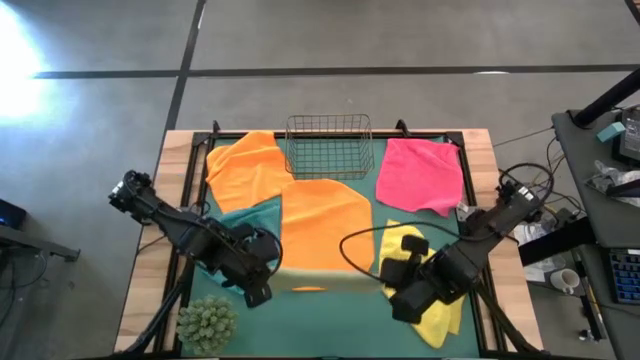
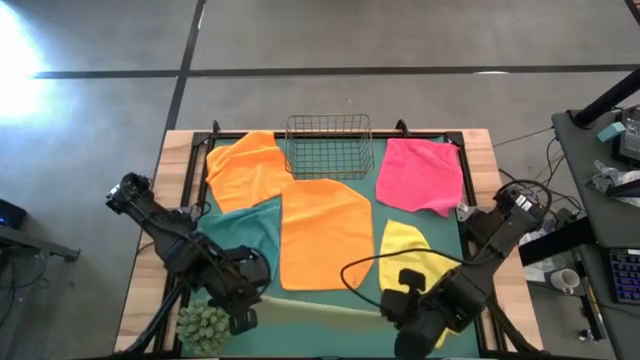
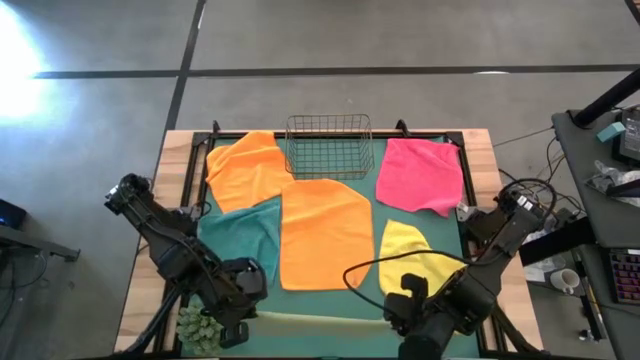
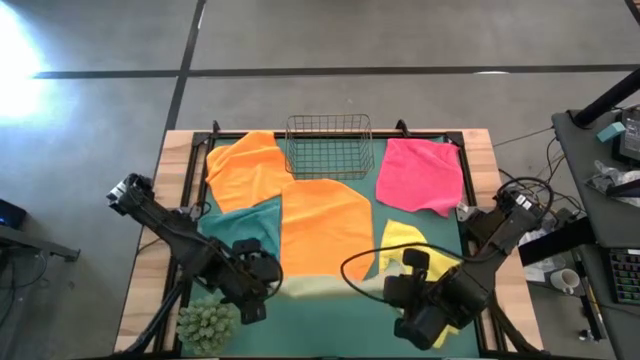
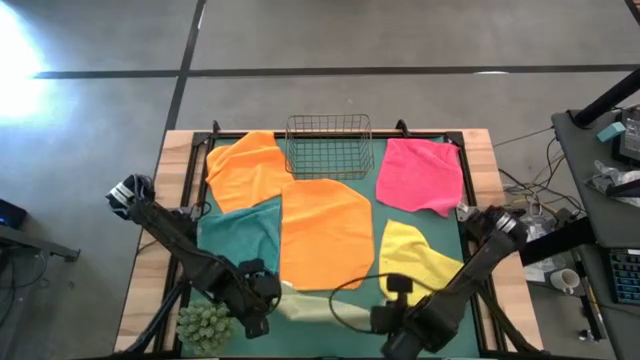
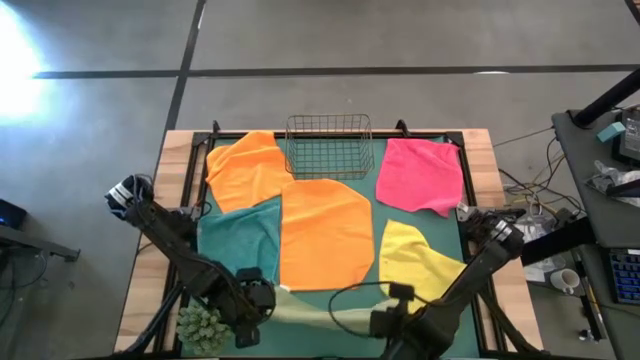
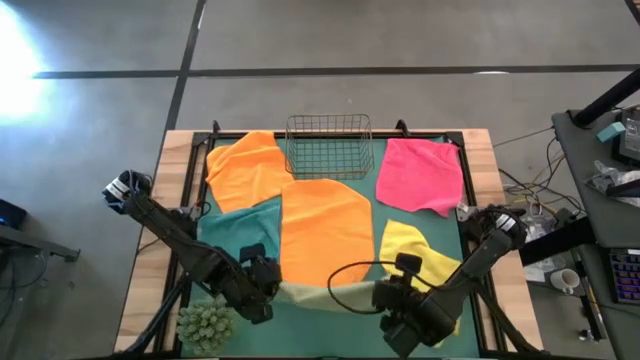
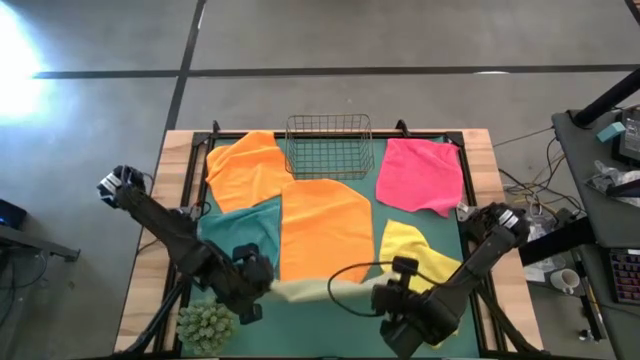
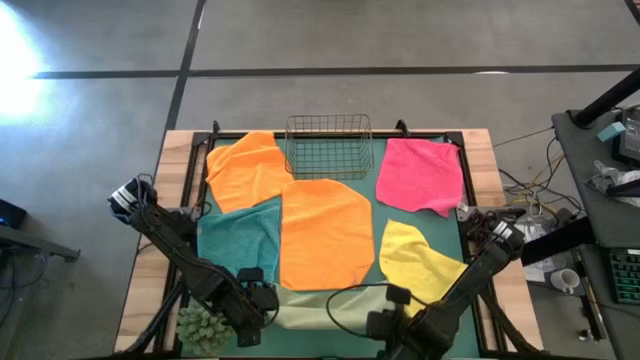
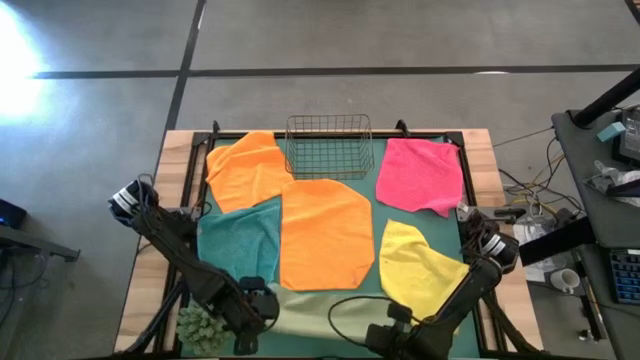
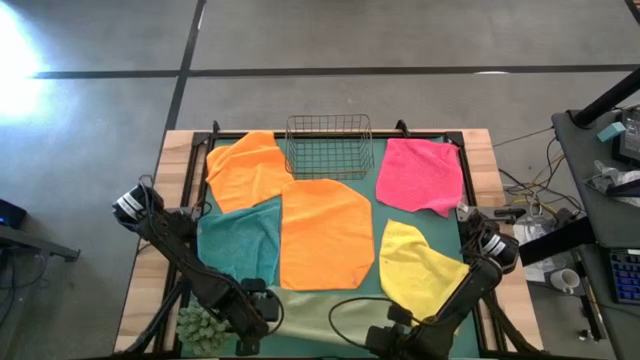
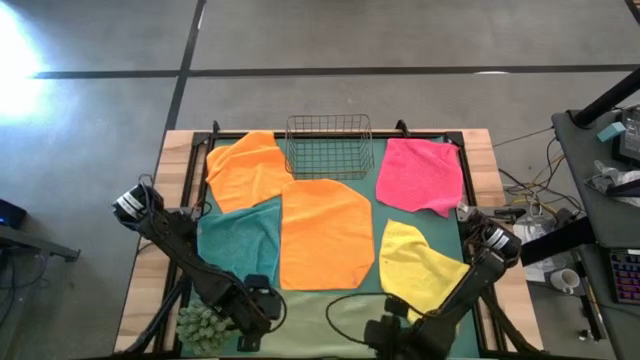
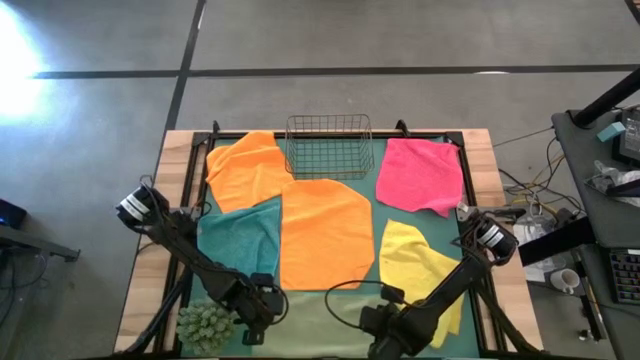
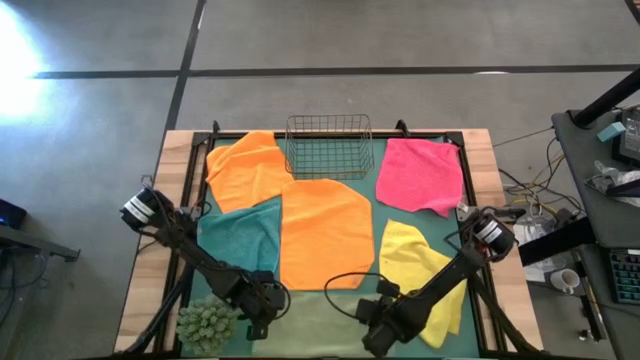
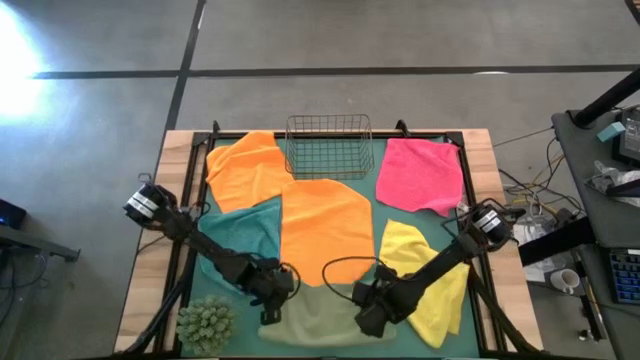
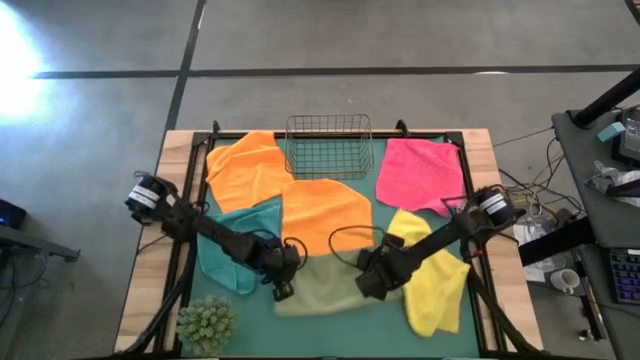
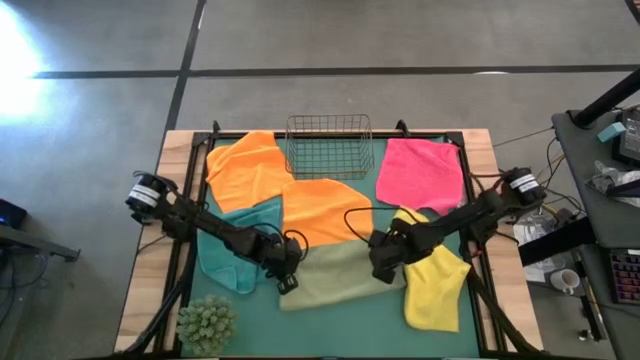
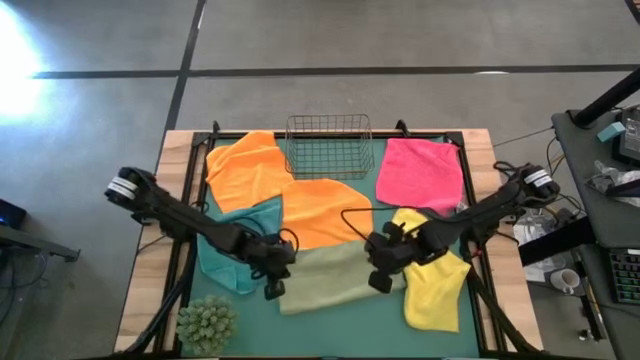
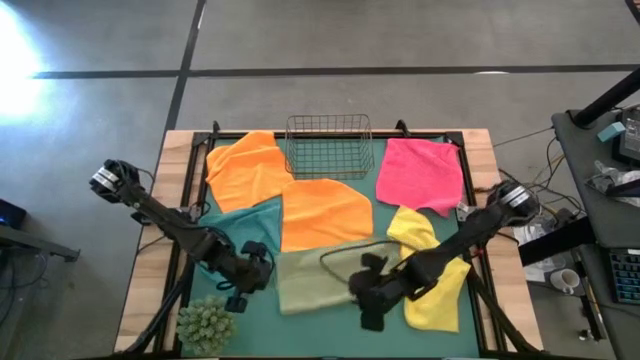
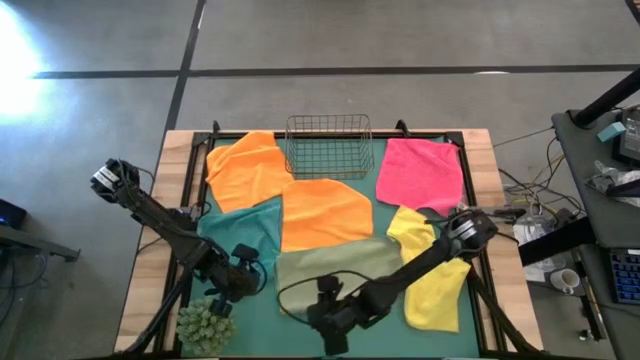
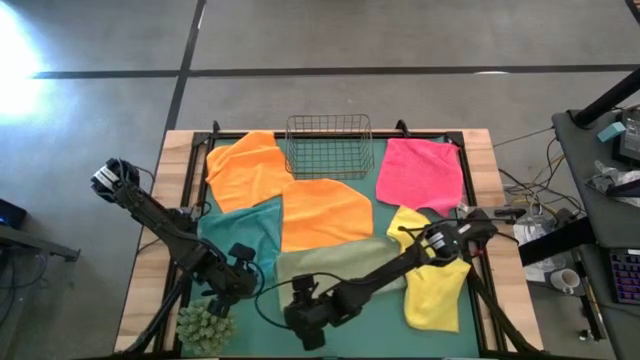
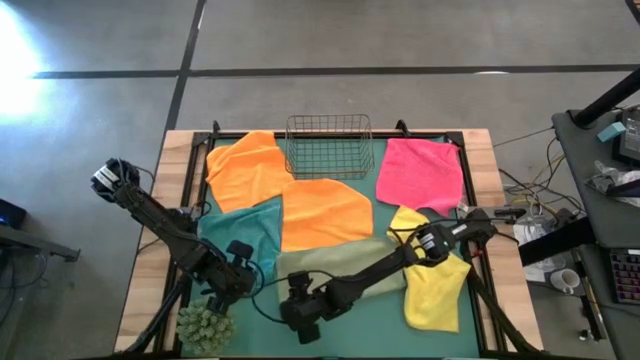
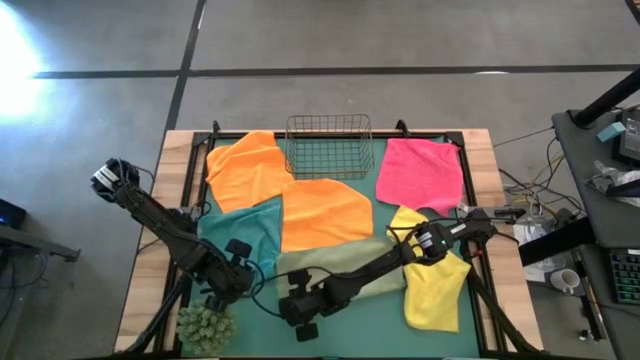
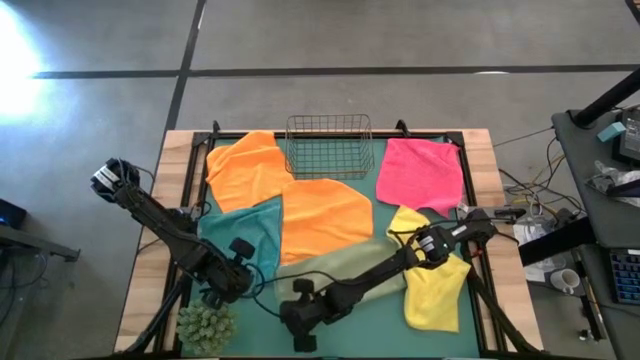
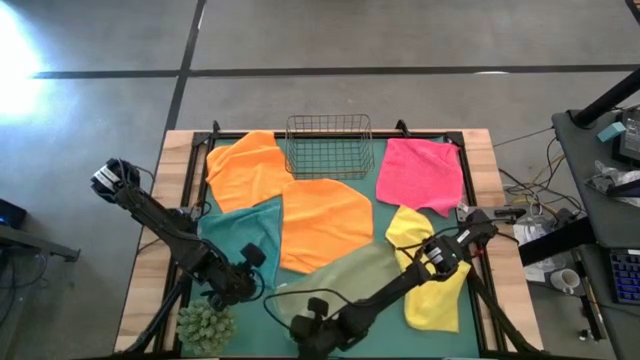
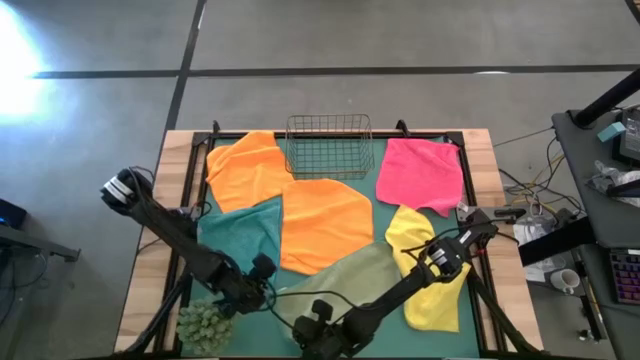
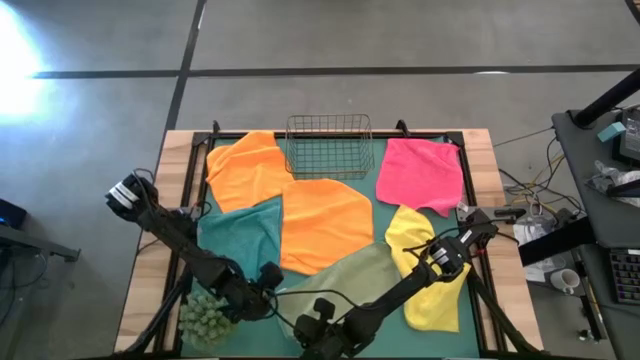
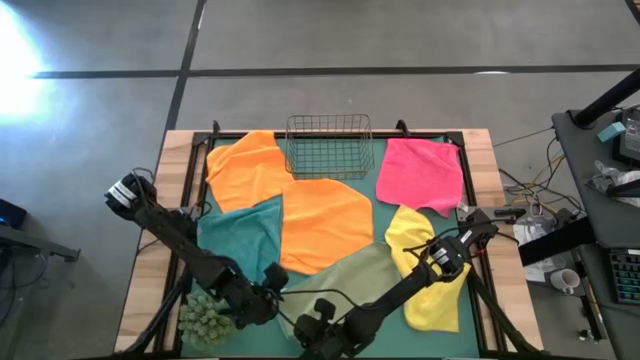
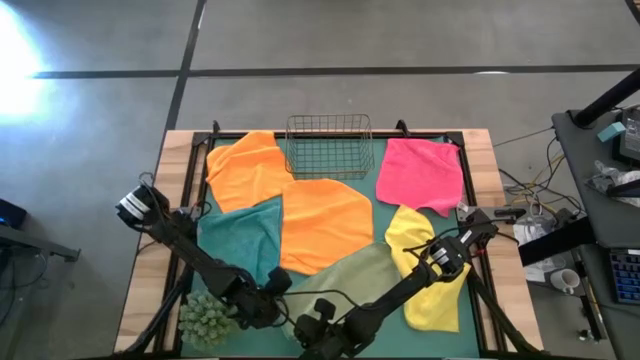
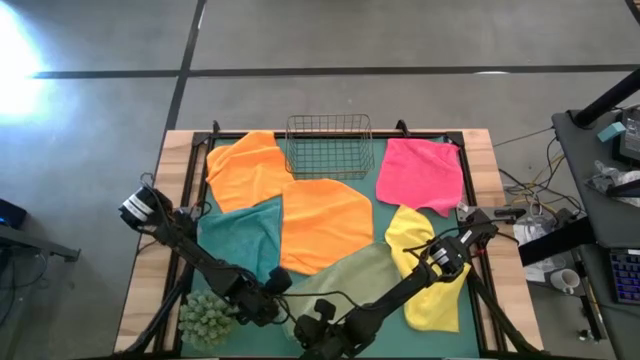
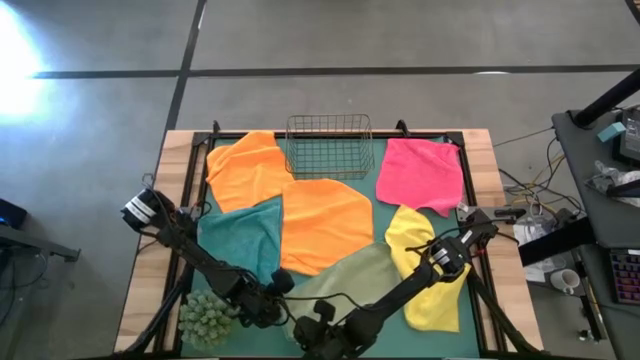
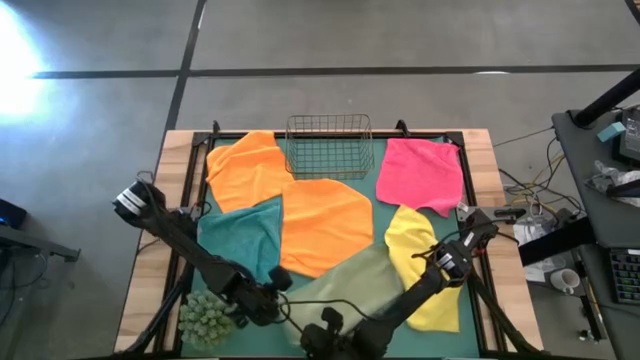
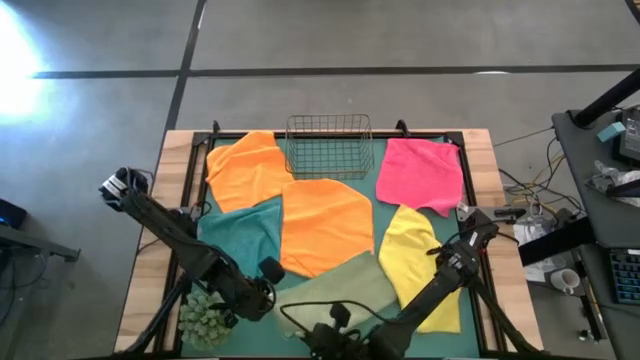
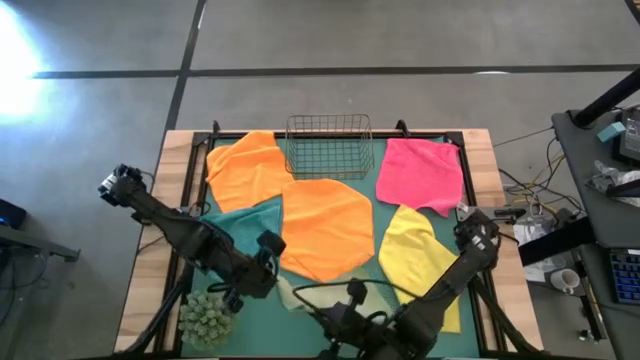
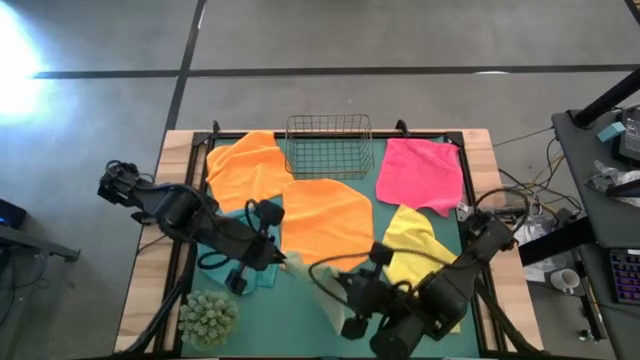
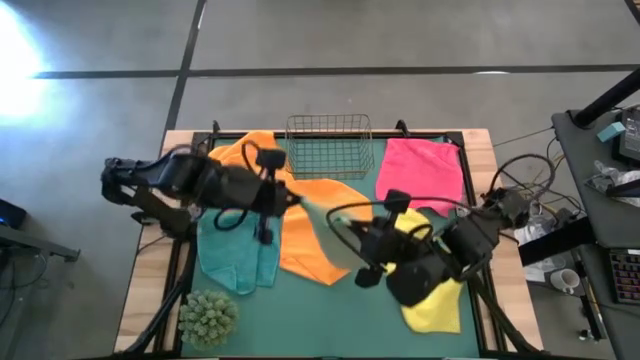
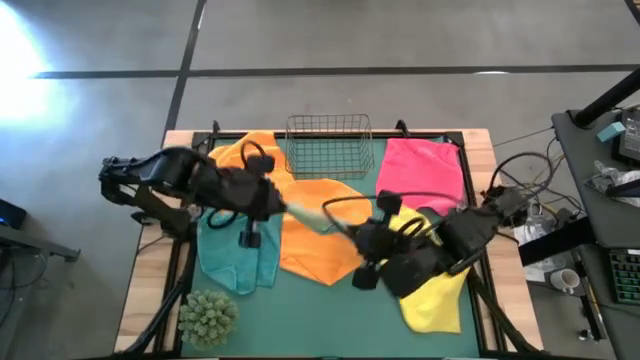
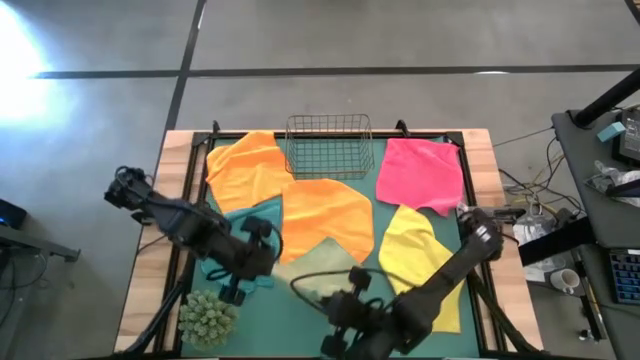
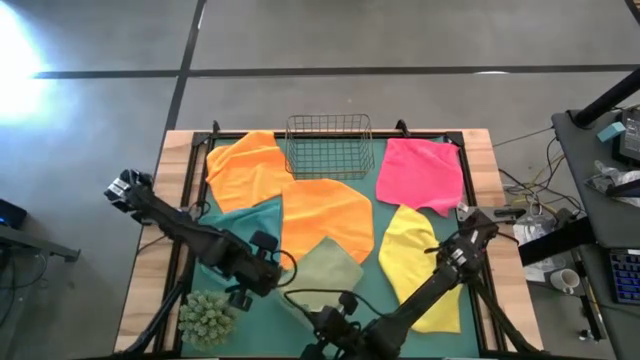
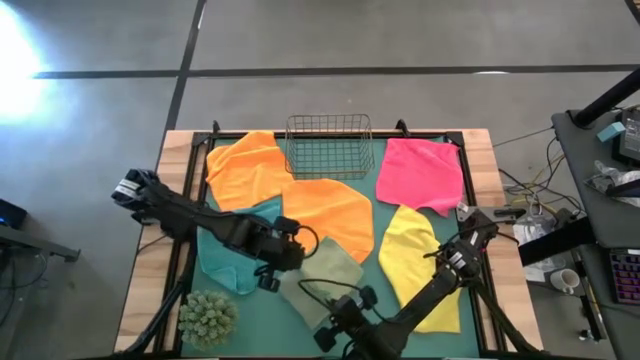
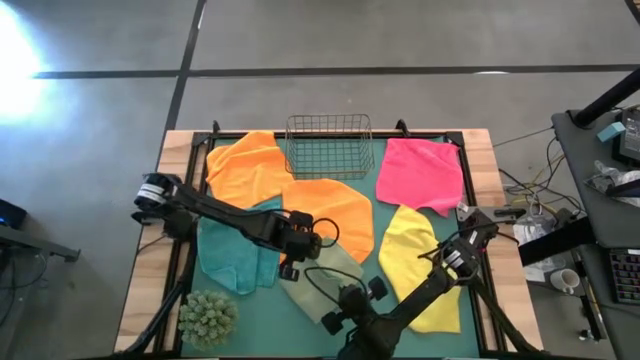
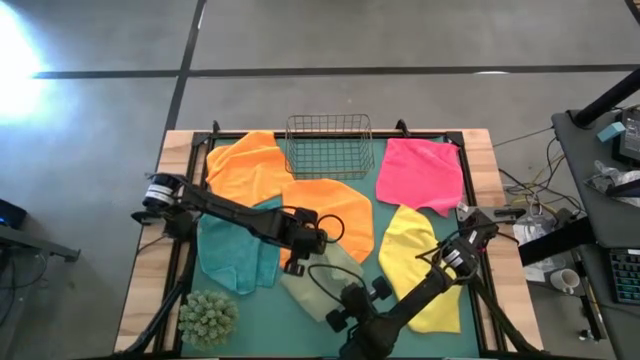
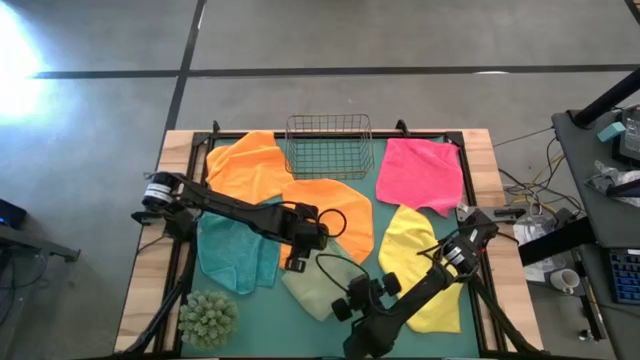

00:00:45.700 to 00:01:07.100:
Task: Fold microfiber towels
Fold the light green microfiber cloth
